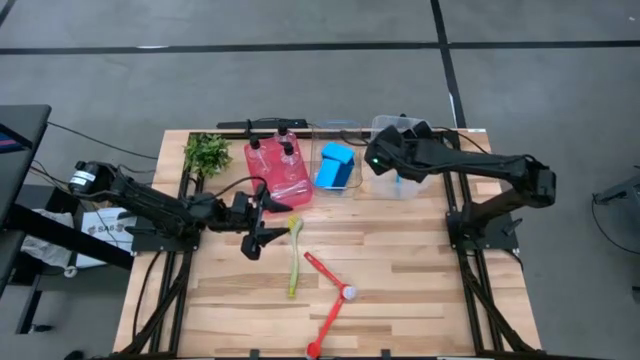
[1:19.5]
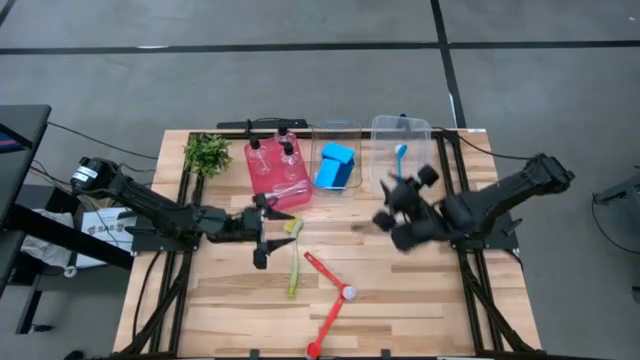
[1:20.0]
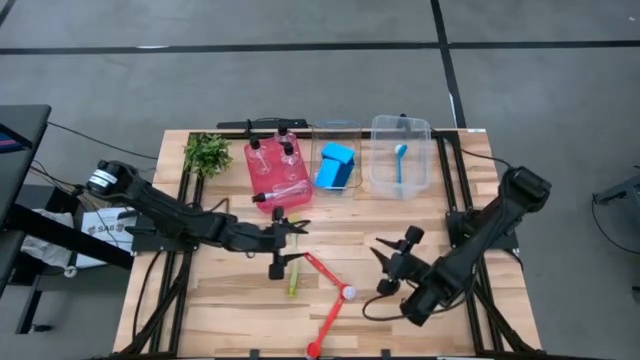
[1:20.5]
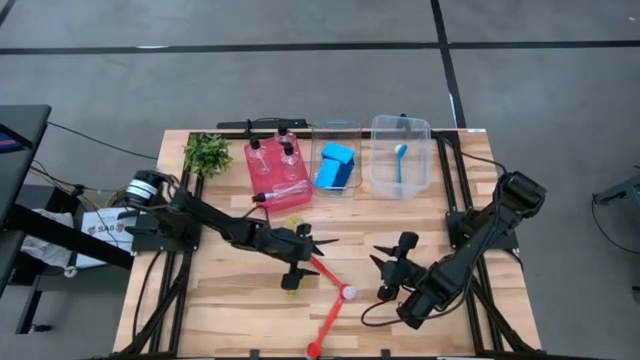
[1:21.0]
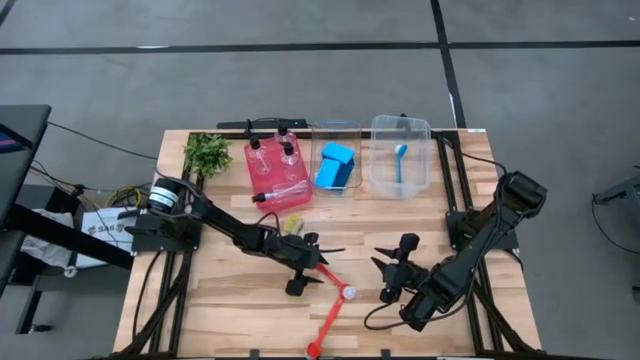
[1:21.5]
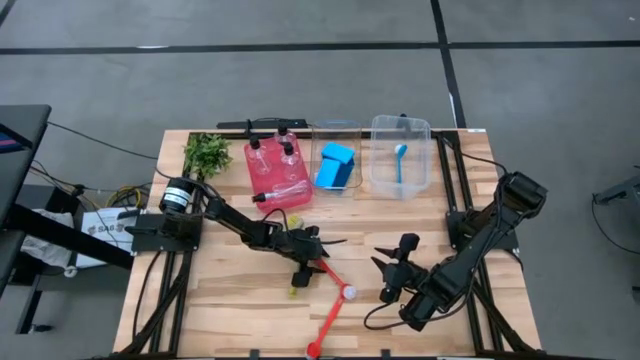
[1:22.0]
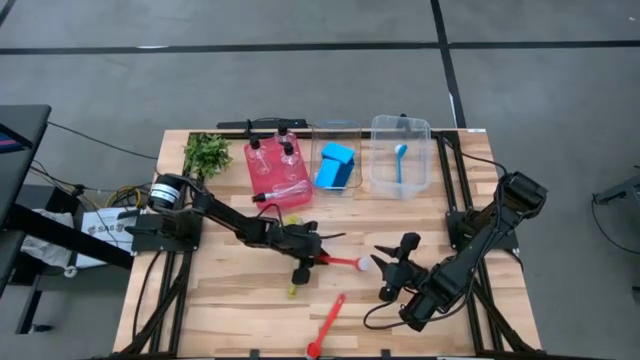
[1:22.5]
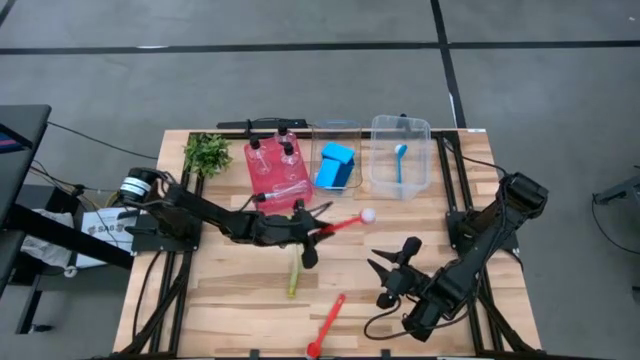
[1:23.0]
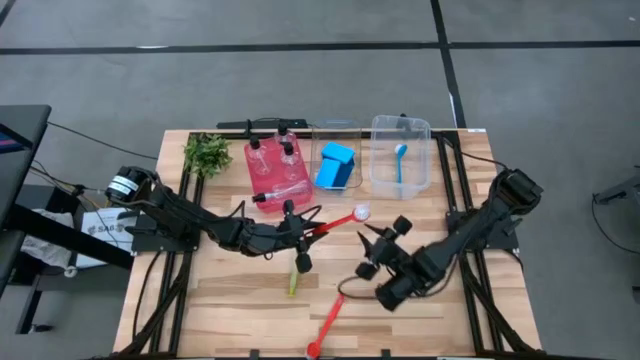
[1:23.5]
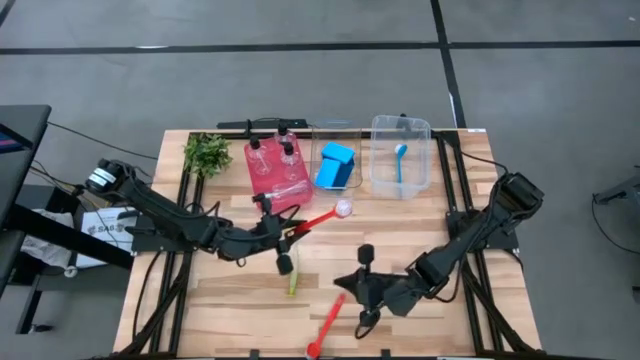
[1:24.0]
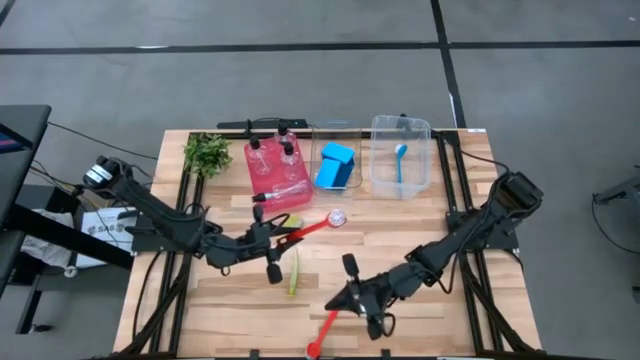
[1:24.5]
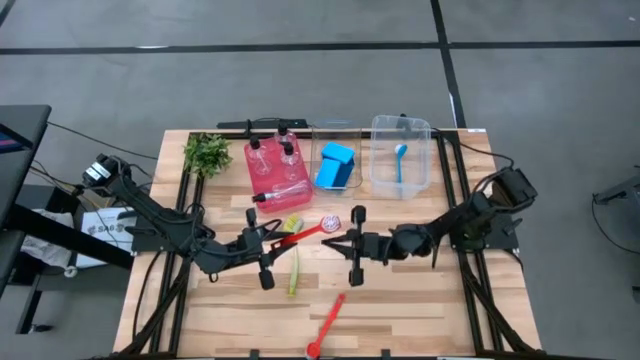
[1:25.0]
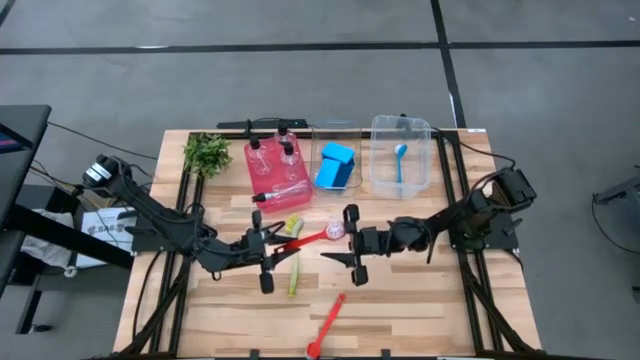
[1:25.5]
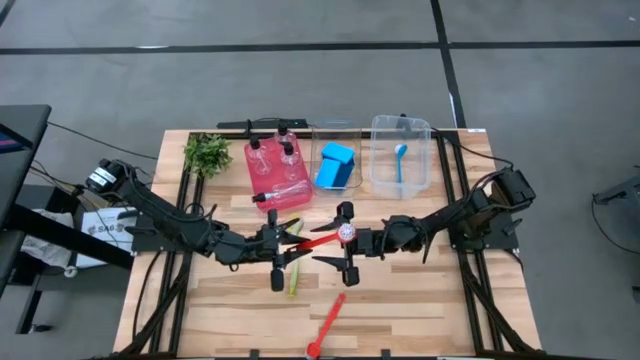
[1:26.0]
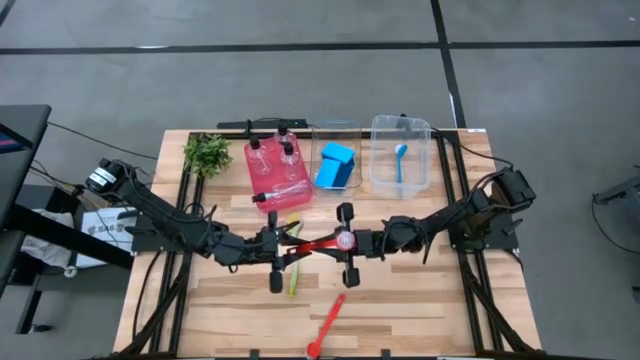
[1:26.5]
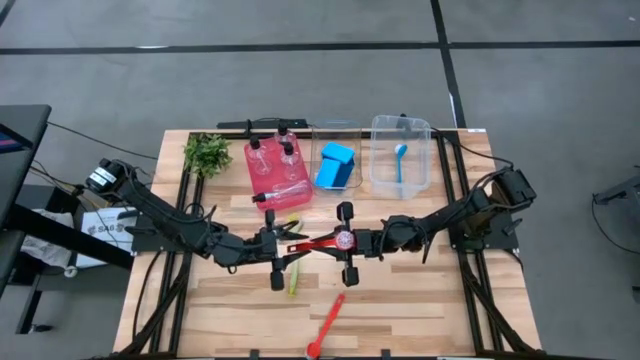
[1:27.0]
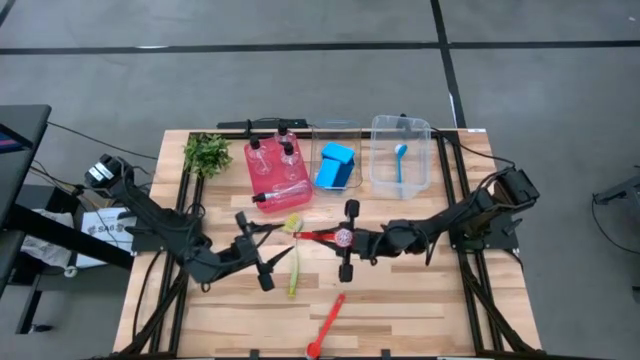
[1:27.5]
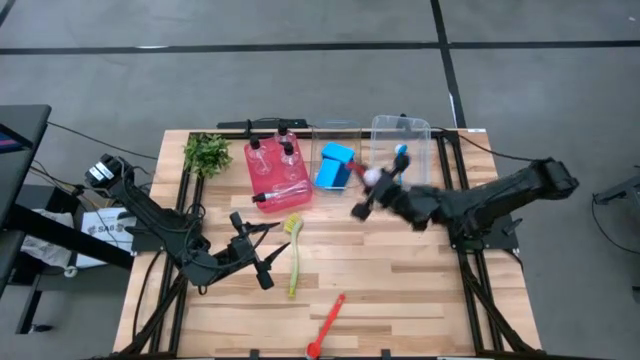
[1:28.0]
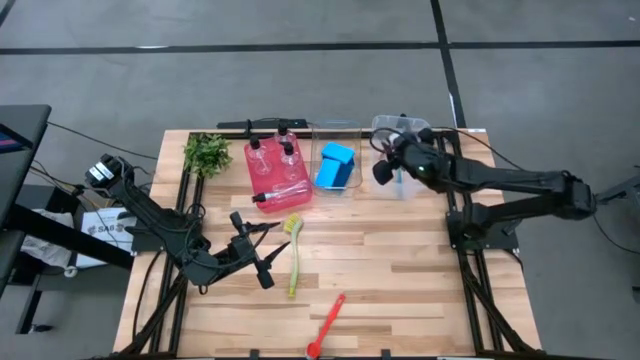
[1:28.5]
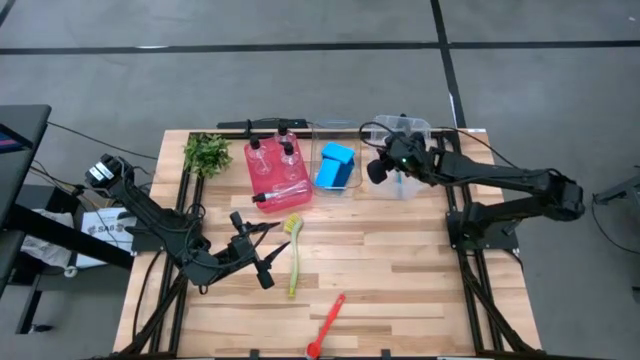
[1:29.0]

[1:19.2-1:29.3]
Task: Pick & Place Kitchen Sink Supplies
Put the orange dish brush into the right transparent bin

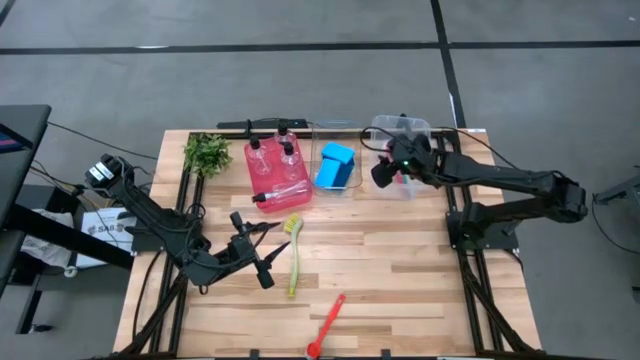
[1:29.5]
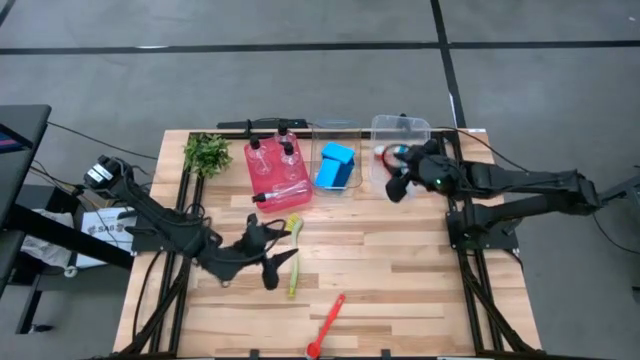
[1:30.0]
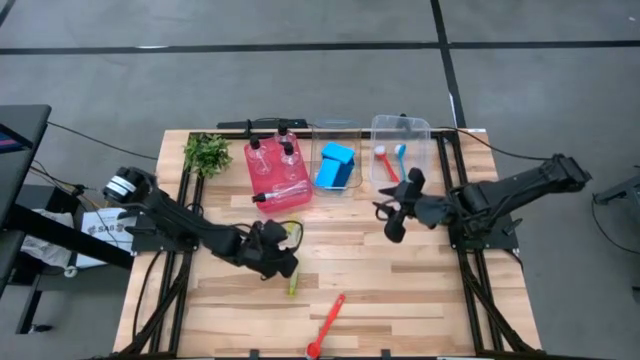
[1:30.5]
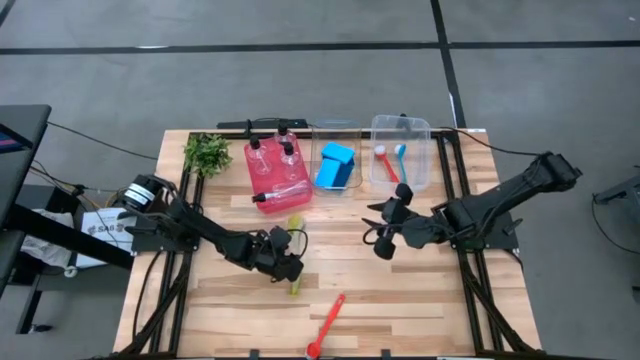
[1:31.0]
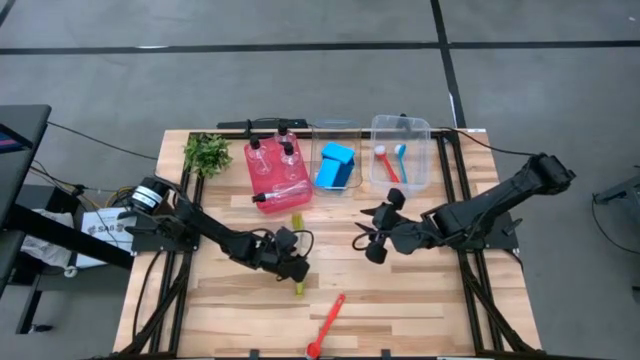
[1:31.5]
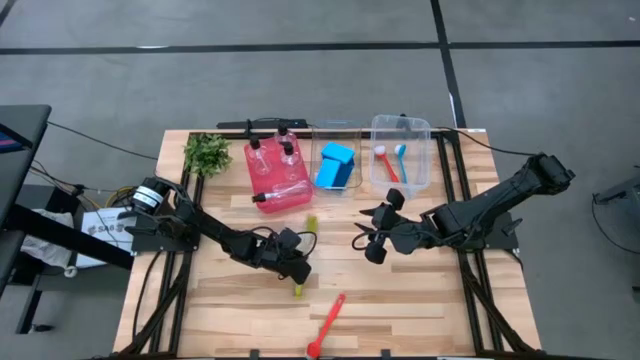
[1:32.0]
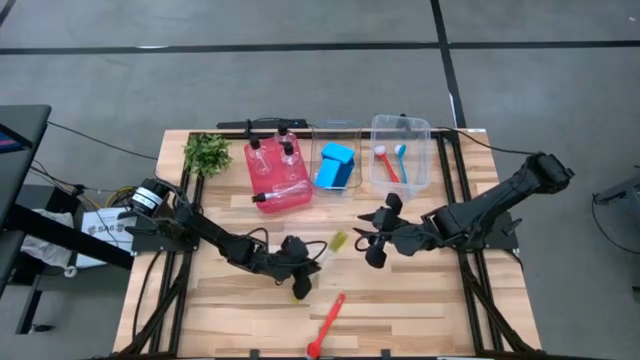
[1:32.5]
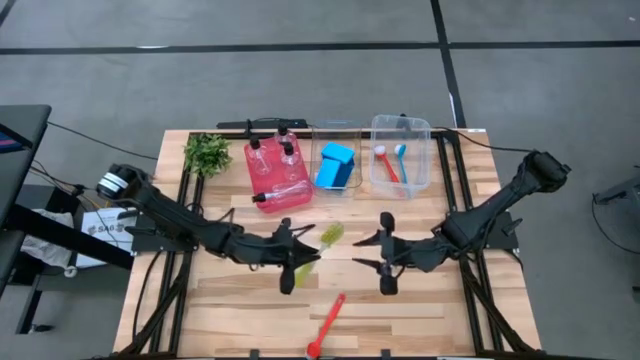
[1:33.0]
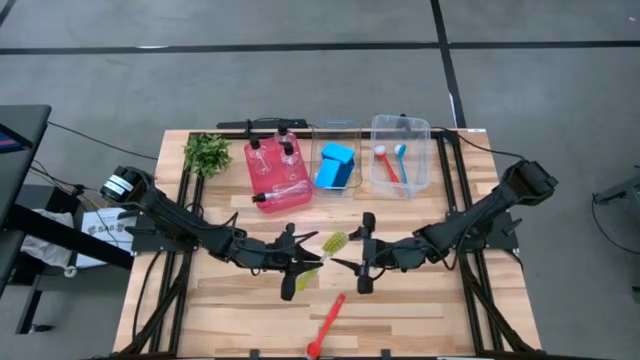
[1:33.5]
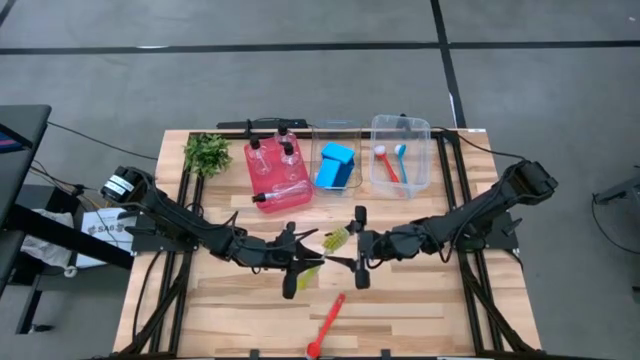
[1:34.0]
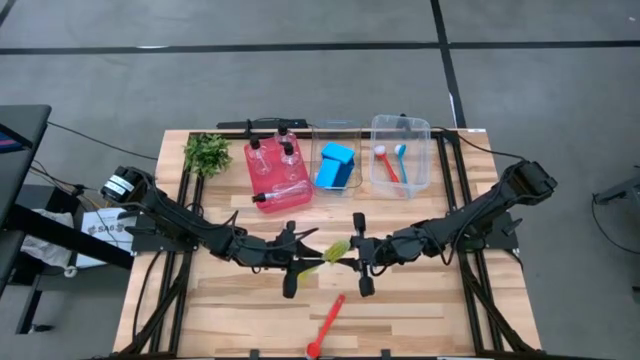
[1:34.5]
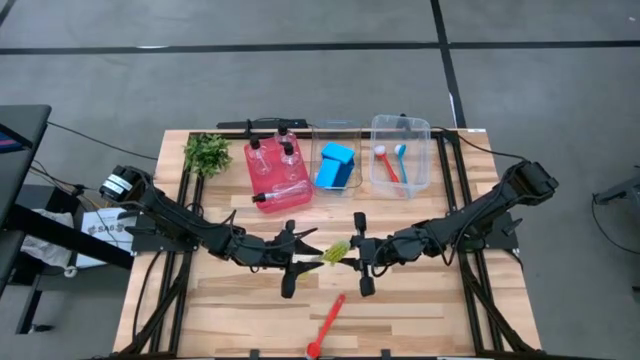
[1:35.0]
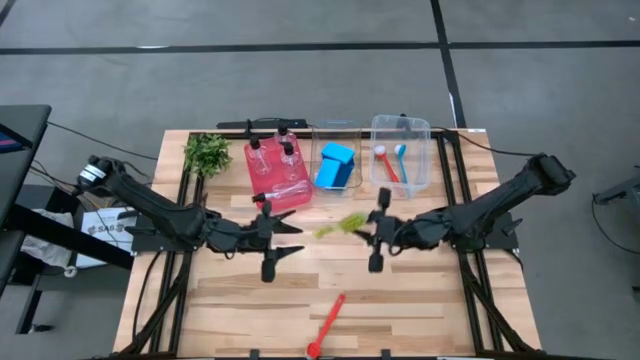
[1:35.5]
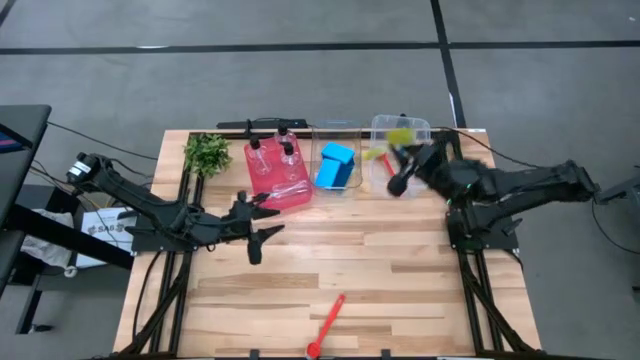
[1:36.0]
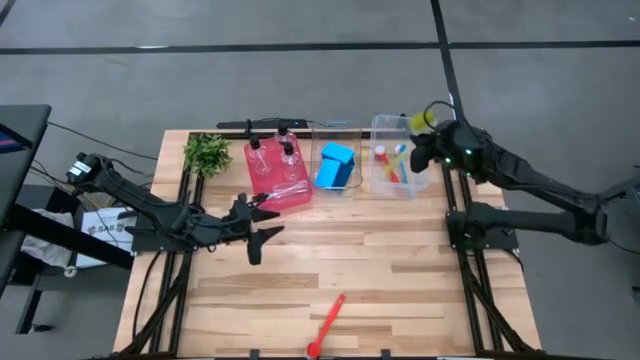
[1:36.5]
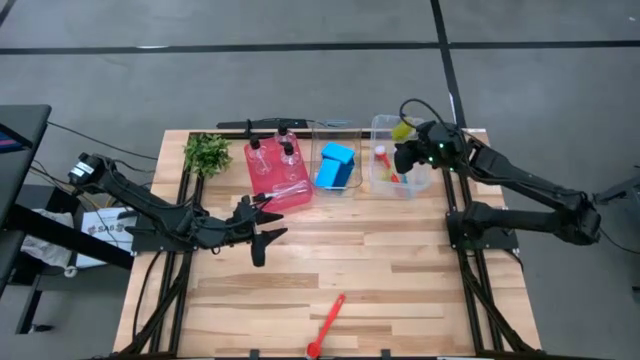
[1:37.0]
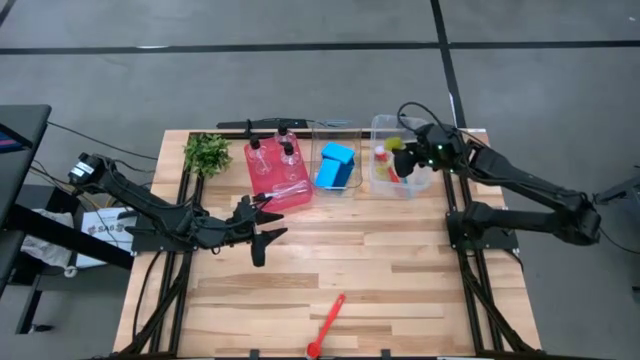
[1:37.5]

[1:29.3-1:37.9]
Put the green dish brush into the right transparent bin

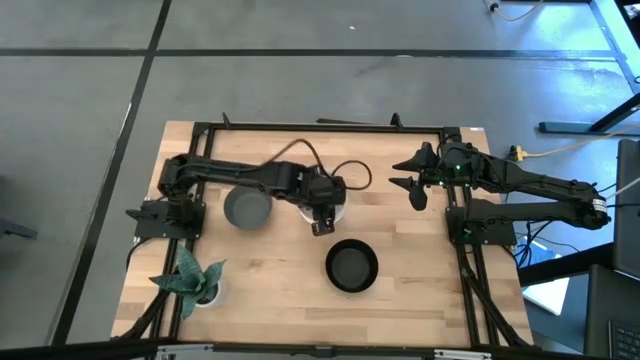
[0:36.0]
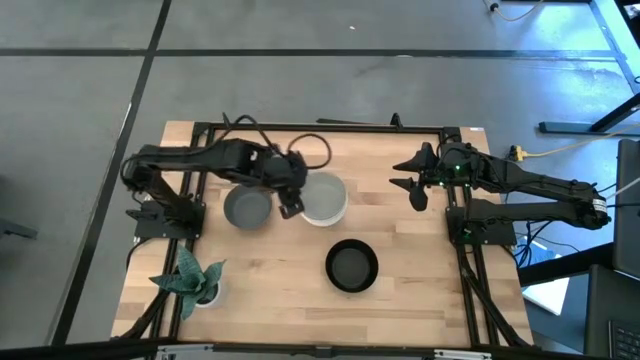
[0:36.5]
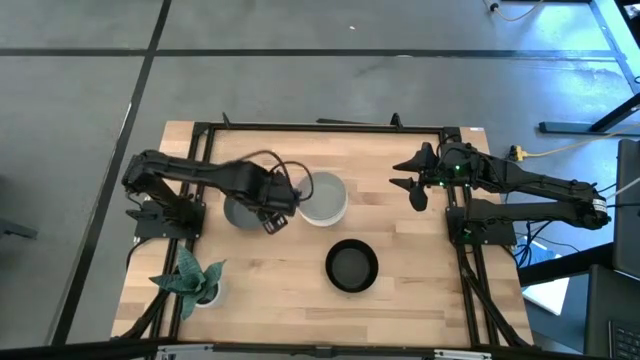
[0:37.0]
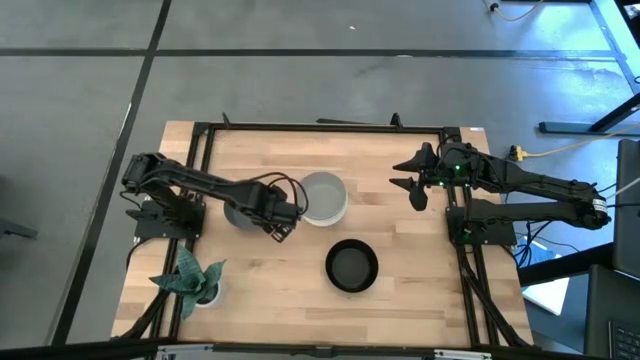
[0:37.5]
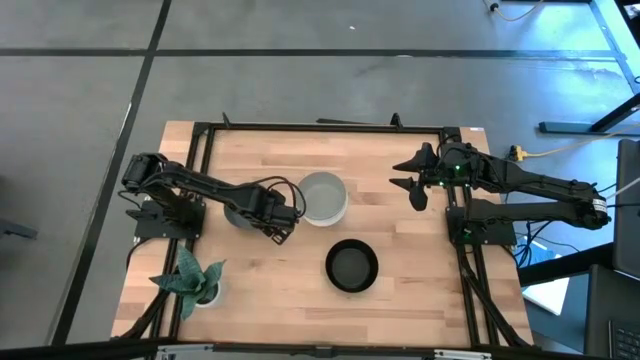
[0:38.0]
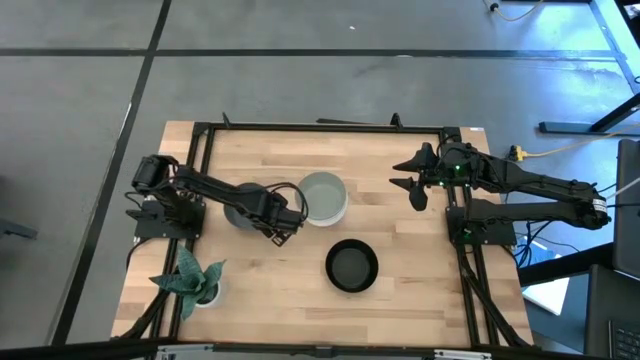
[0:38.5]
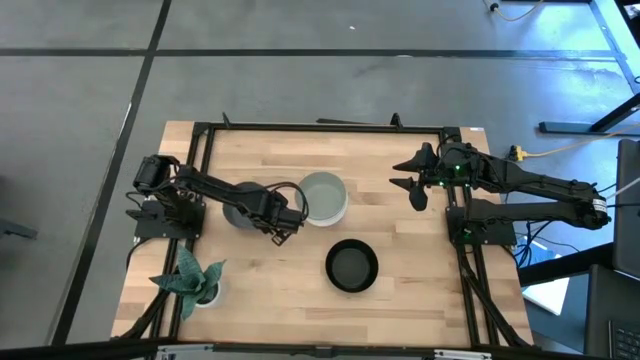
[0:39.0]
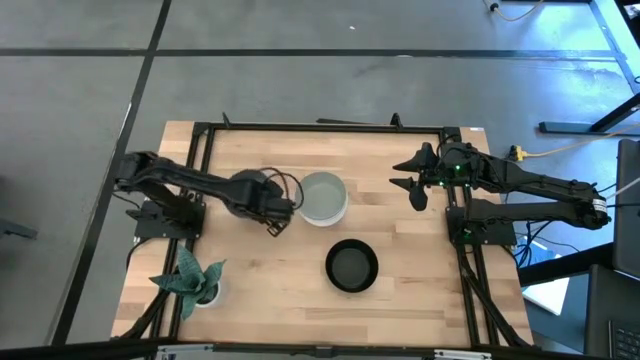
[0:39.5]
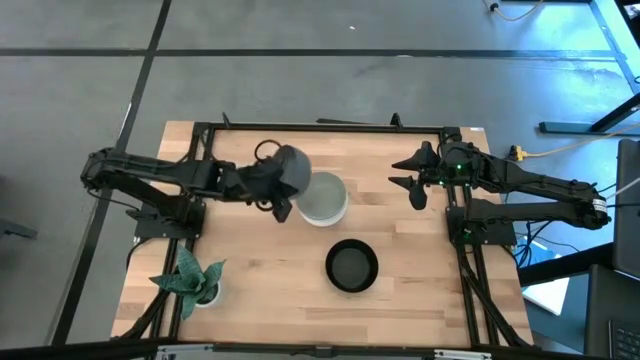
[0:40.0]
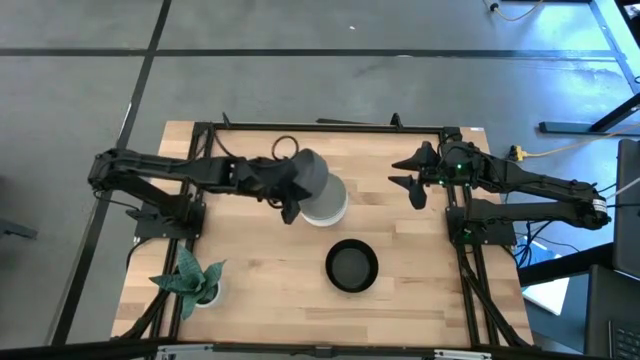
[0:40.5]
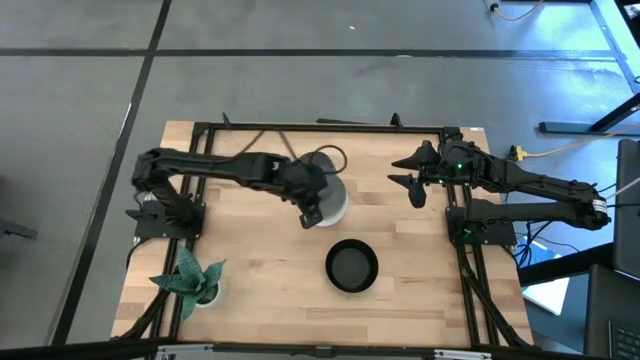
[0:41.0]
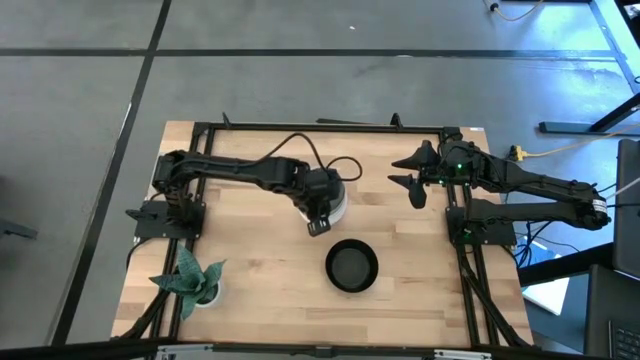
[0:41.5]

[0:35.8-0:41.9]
Task: Nest bowls inside each other
Stack the gray bowl on top of the light gray bowl
